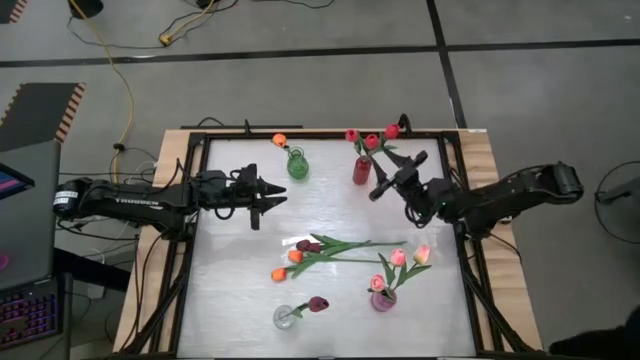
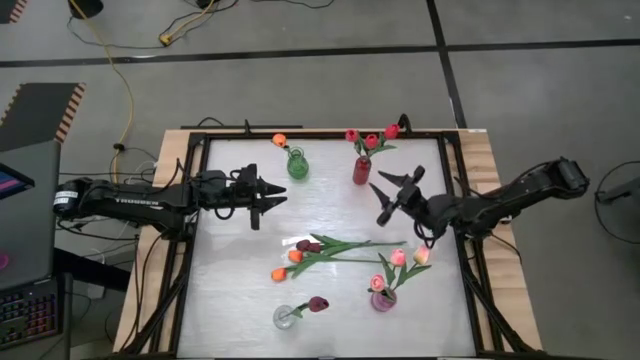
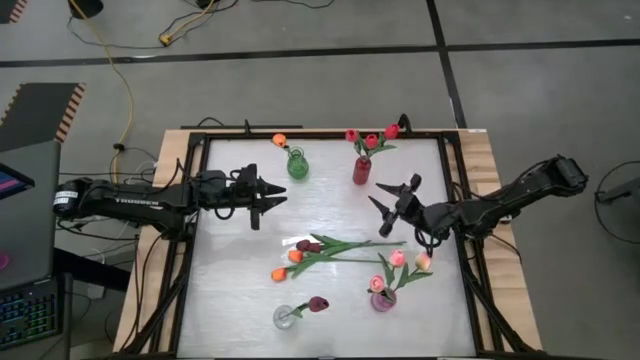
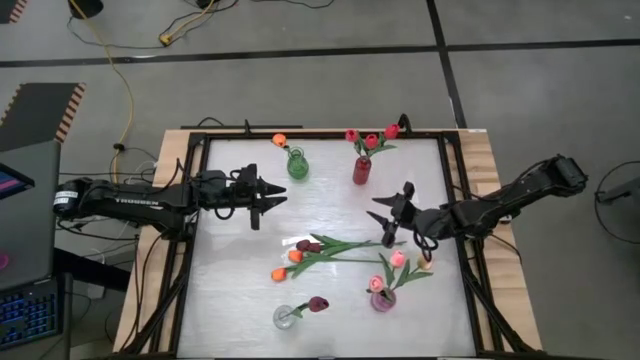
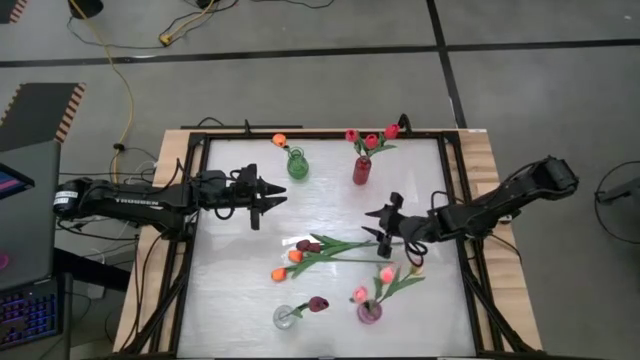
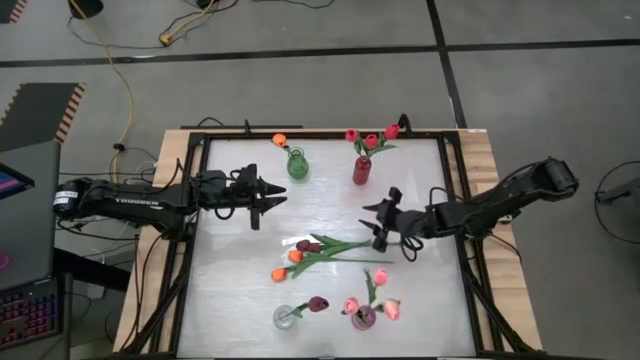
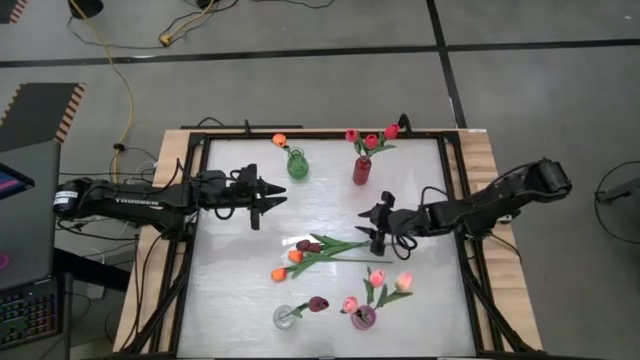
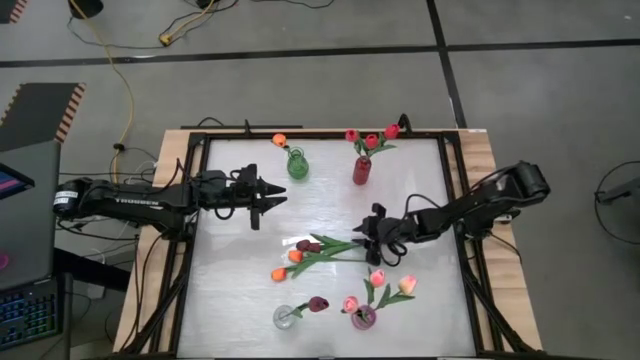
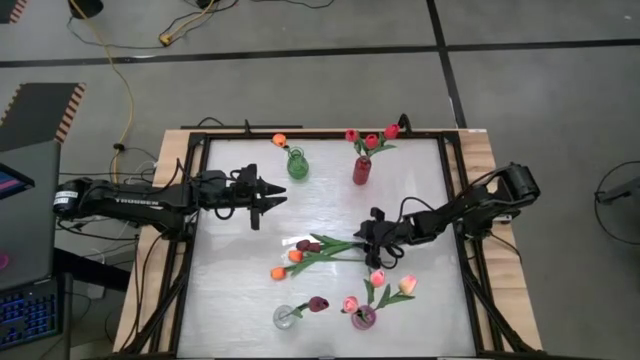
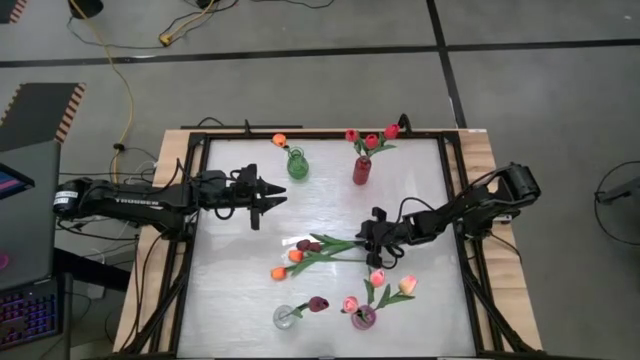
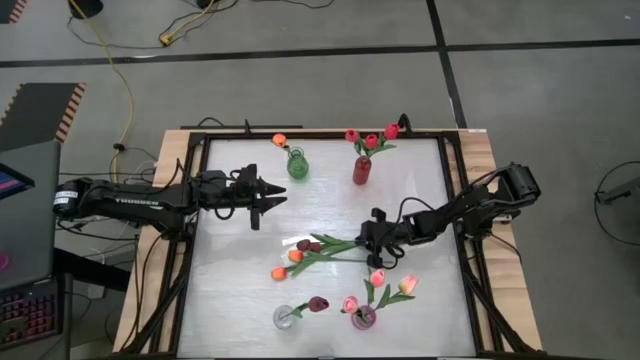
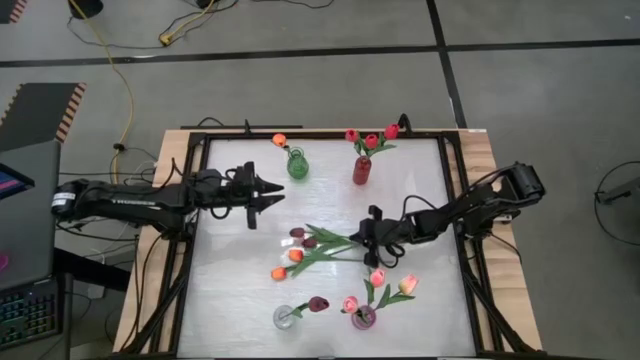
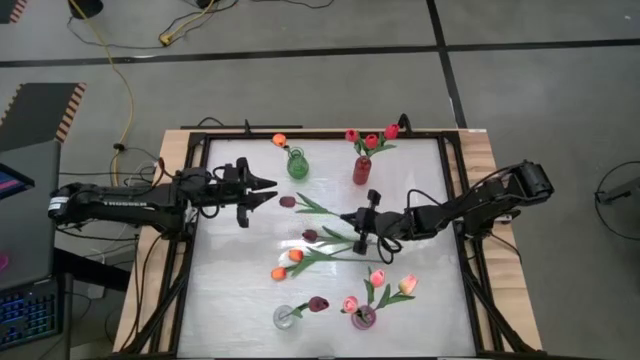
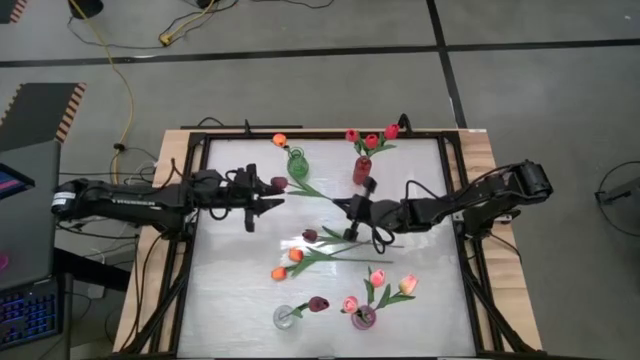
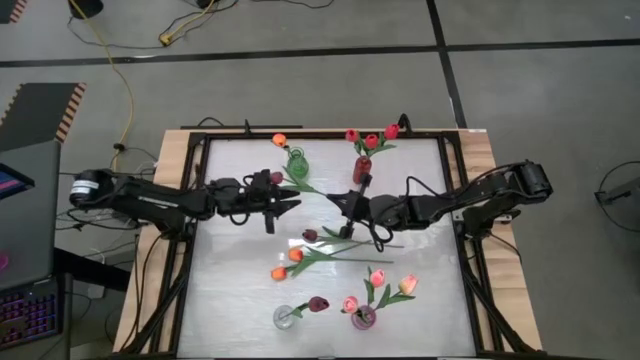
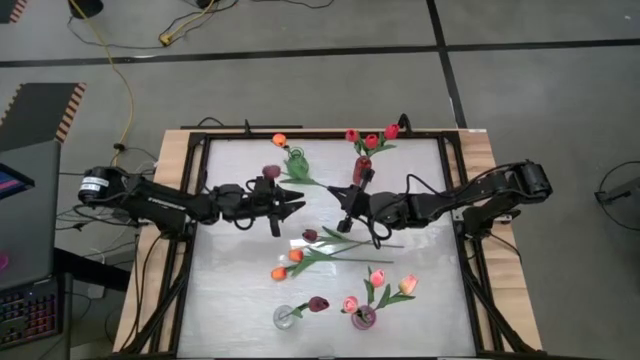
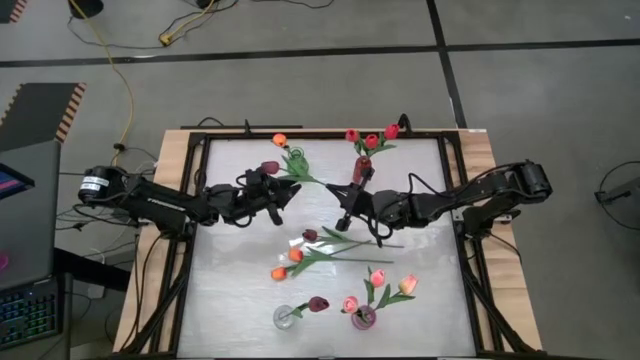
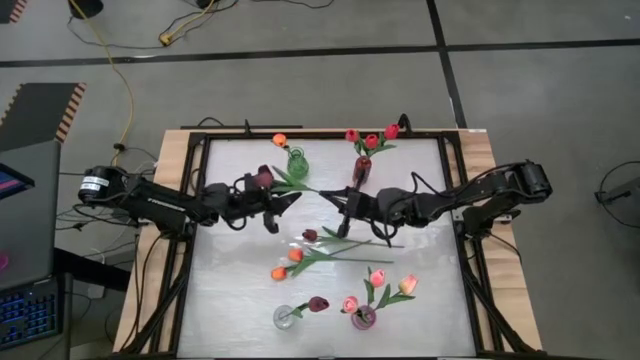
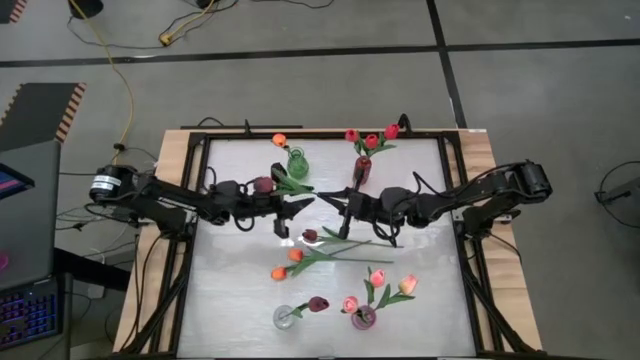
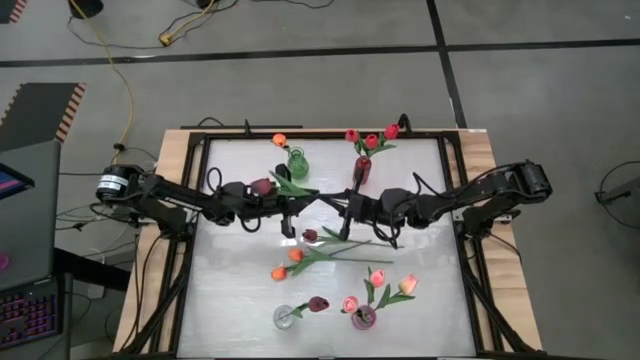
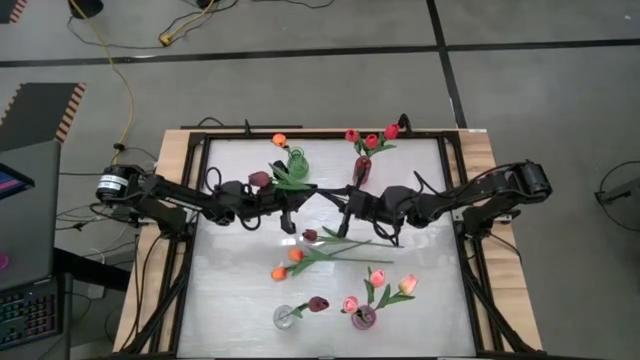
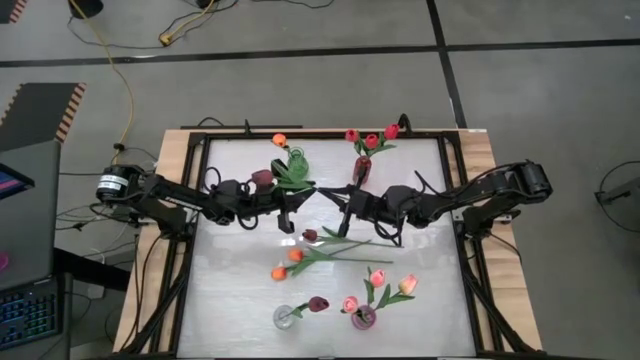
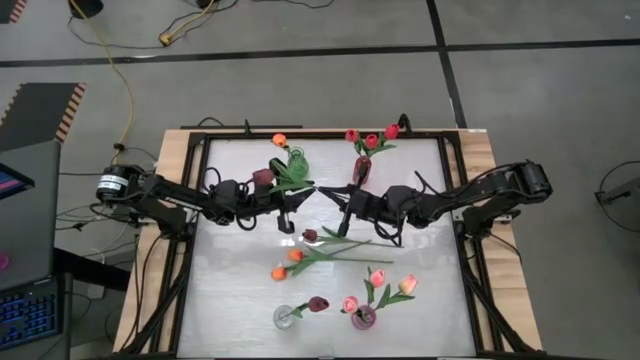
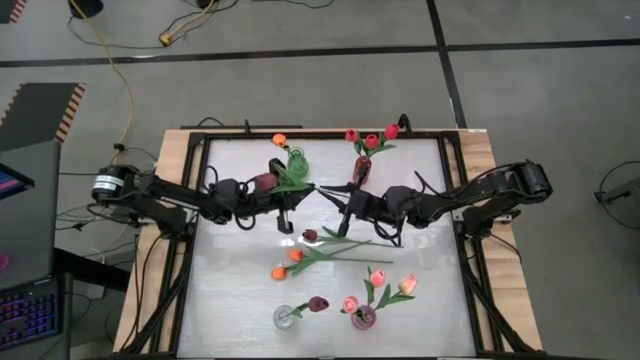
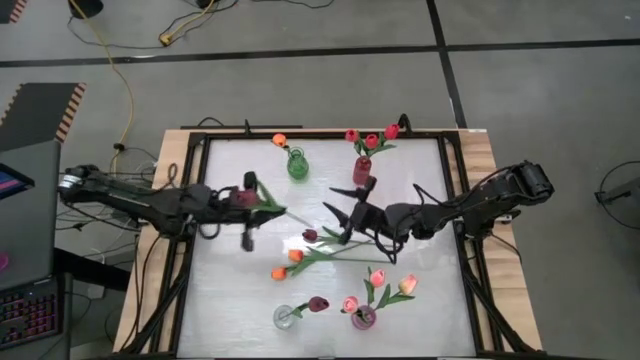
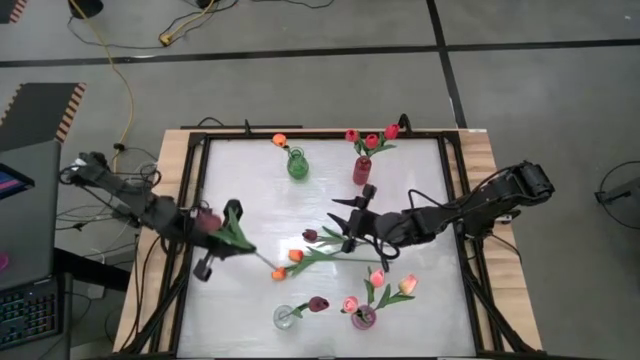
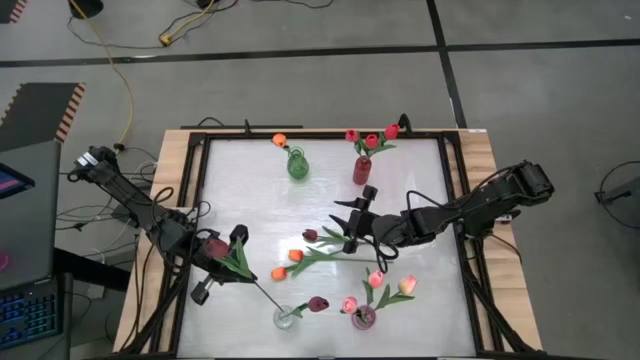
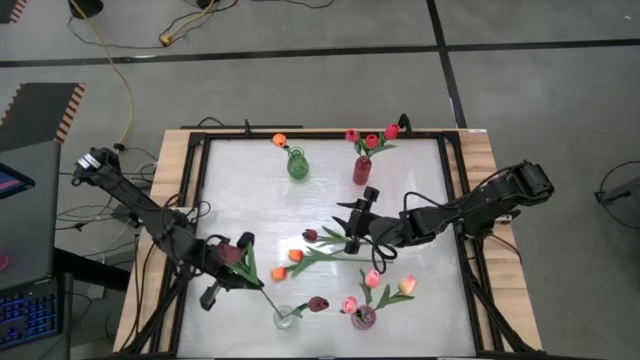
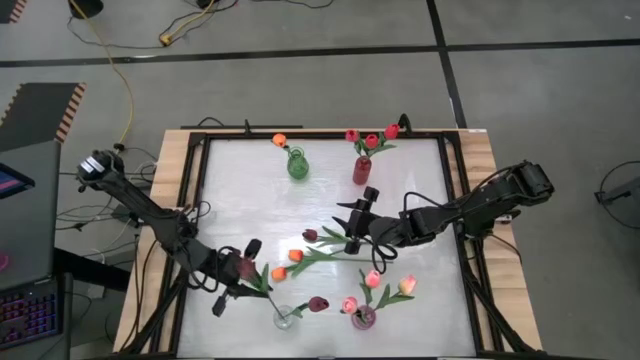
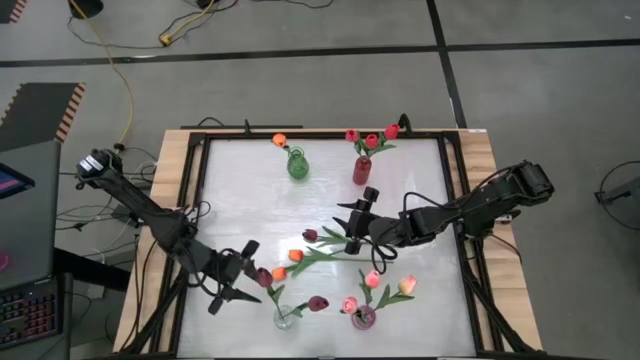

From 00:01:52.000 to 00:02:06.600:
Task: Sort flowers into vase by color
Put the dark red flower into the transparent vase

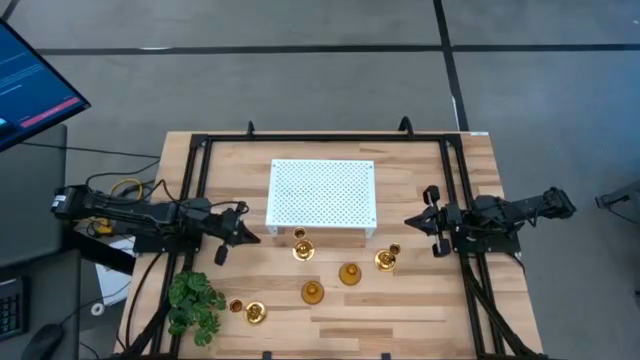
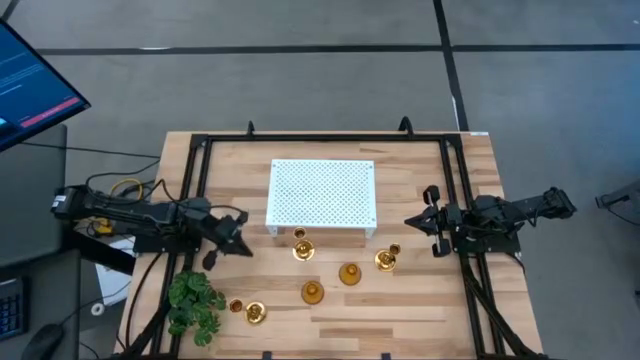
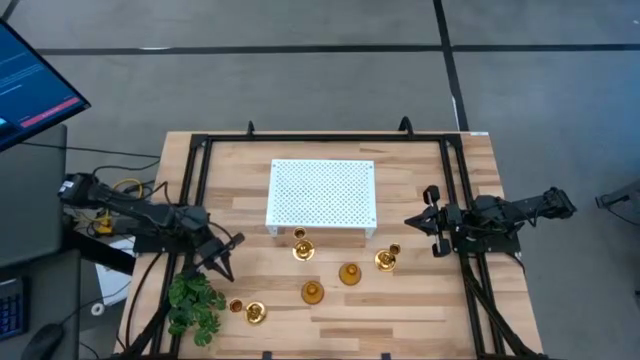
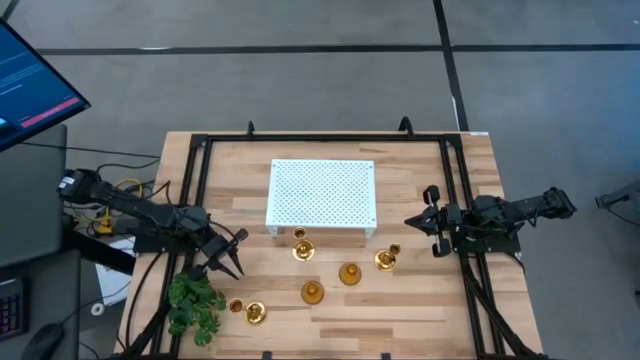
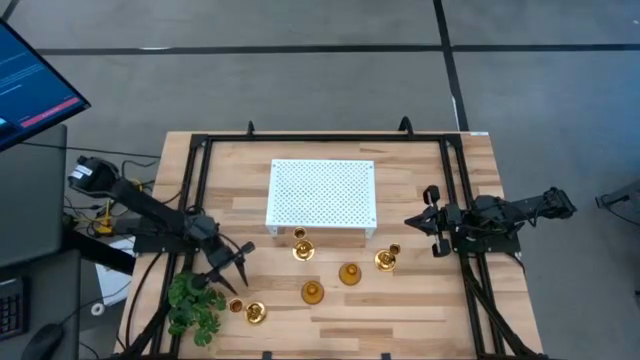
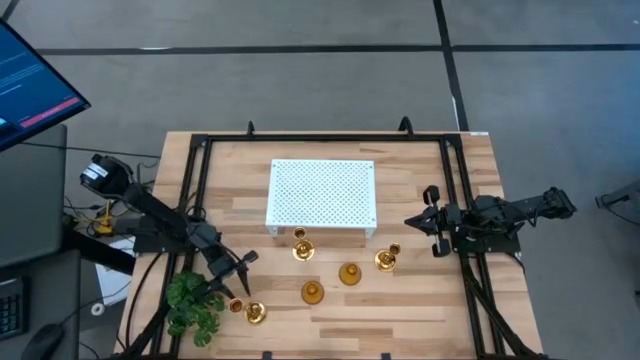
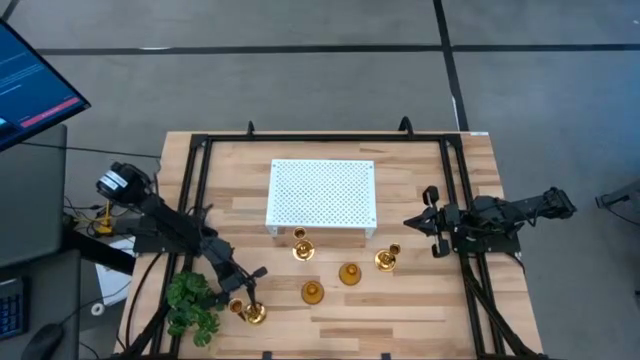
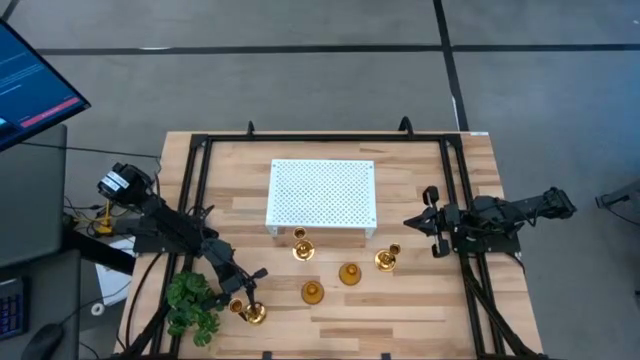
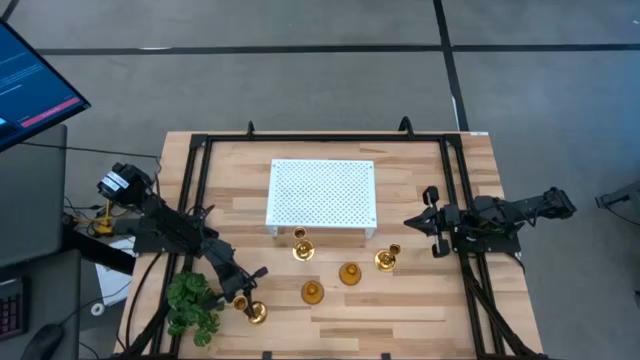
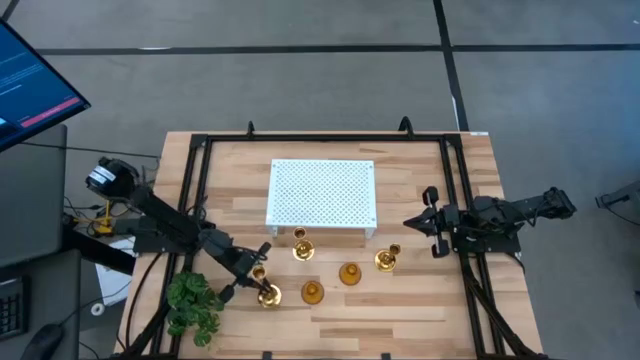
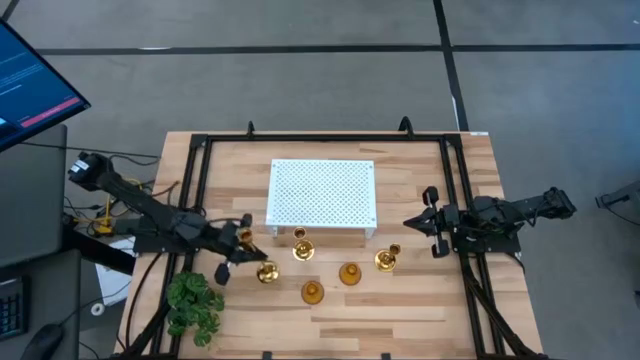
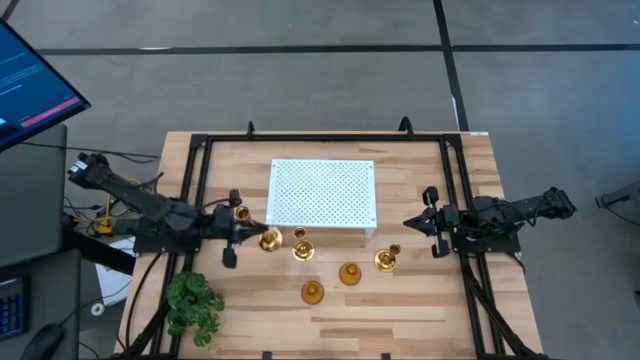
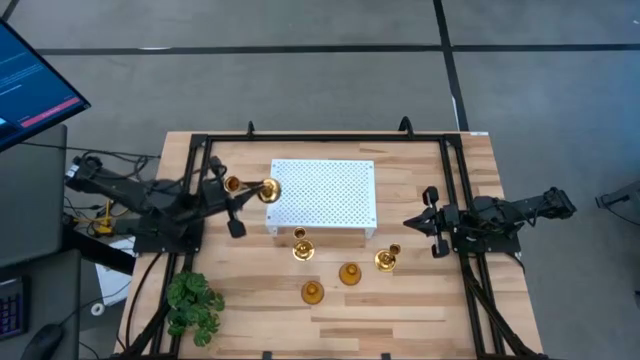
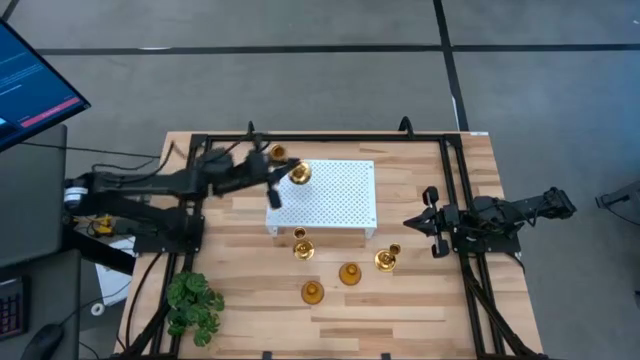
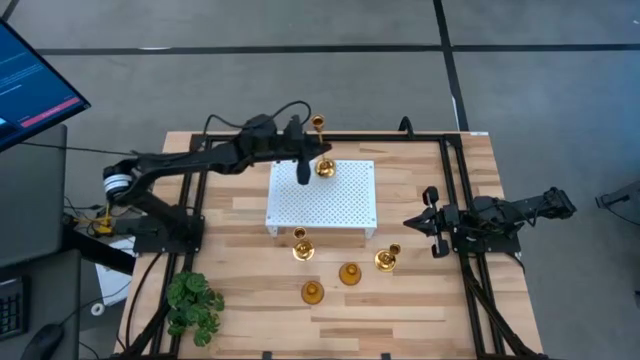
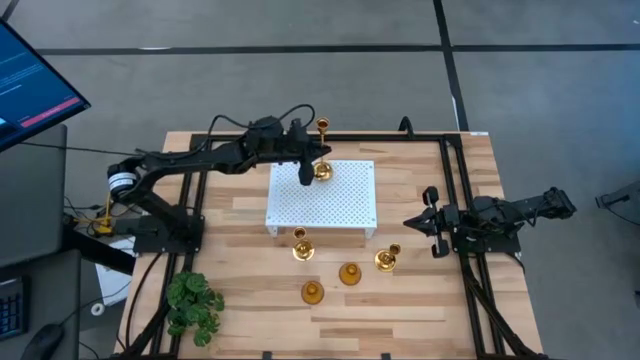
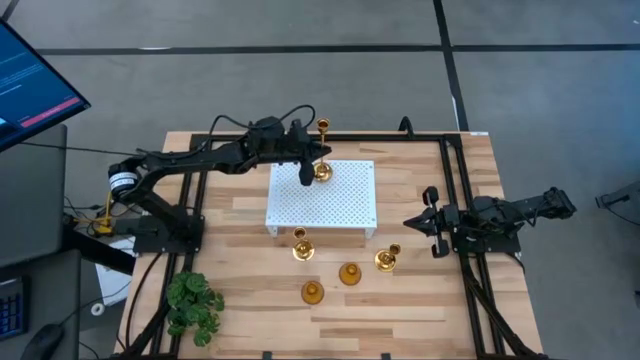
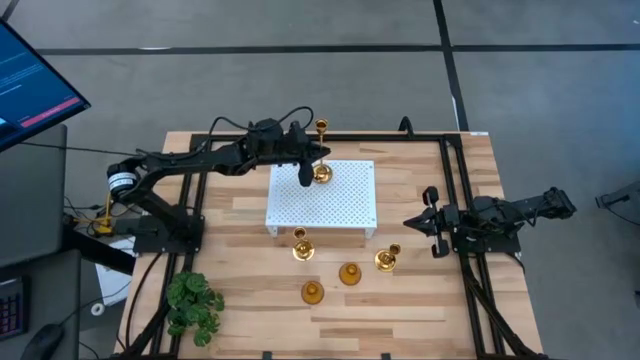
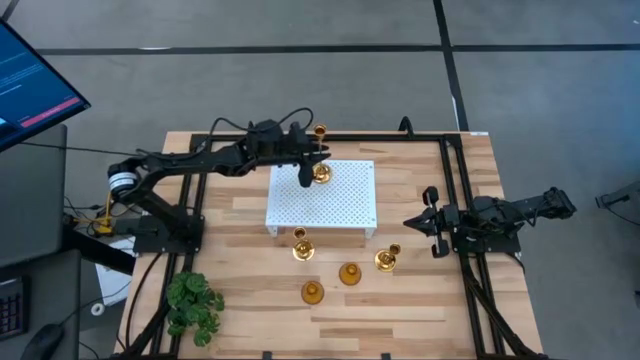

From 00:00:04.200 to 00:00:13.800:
Task: Pick & Place candle stick holders
Put the bottom gold candle holder on the shelf
